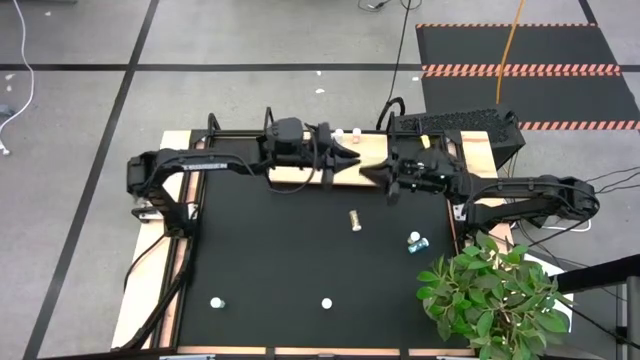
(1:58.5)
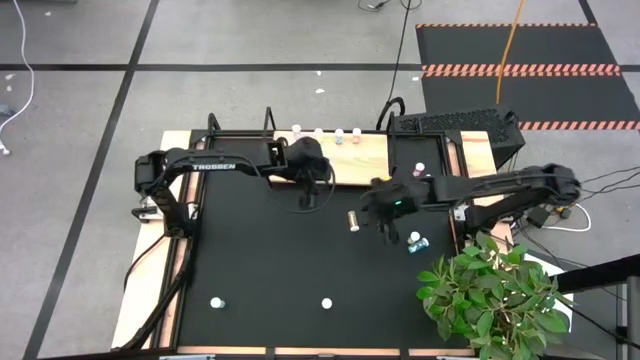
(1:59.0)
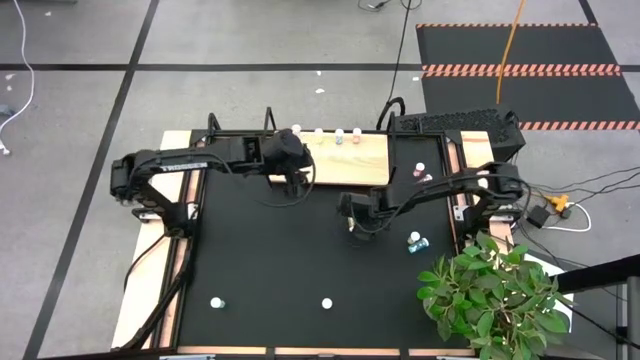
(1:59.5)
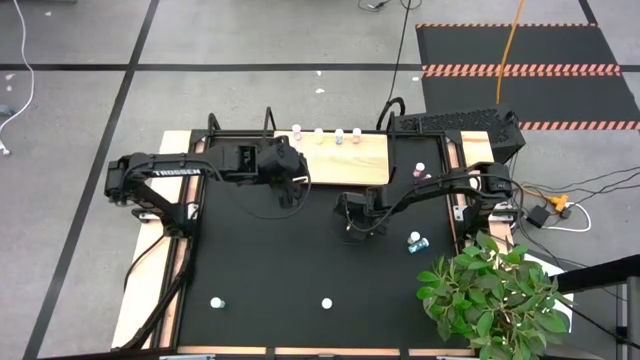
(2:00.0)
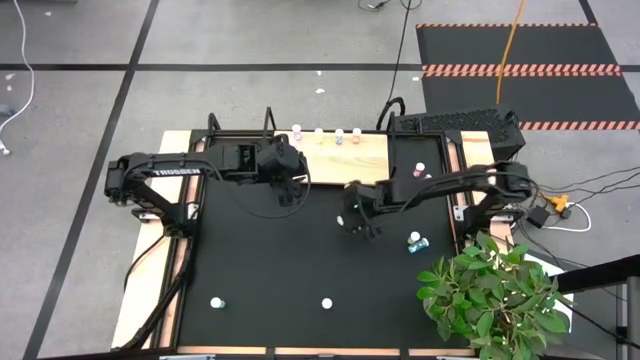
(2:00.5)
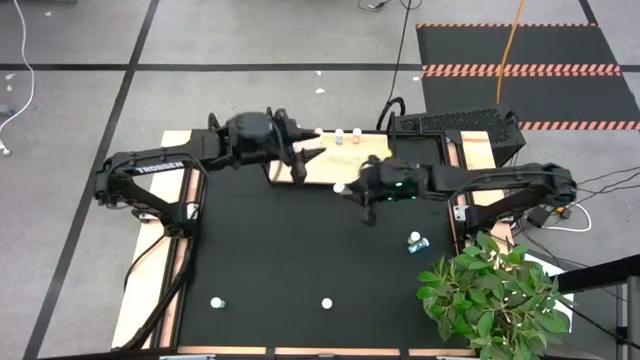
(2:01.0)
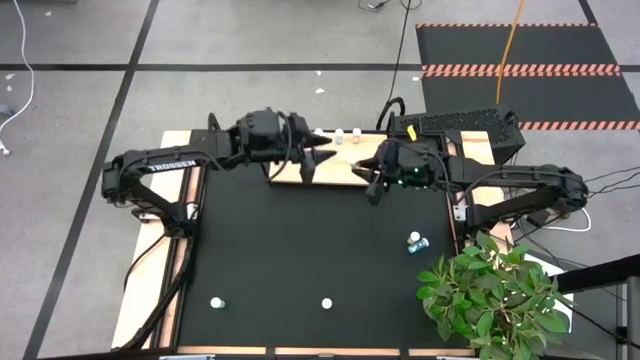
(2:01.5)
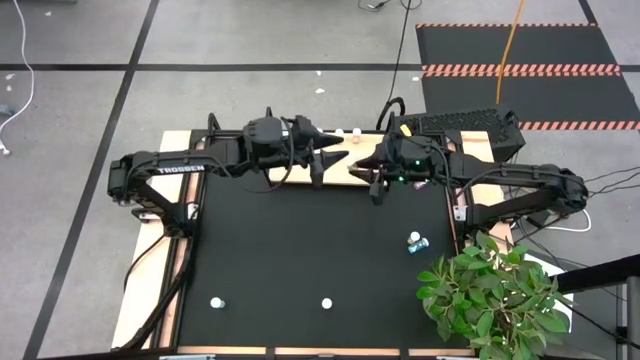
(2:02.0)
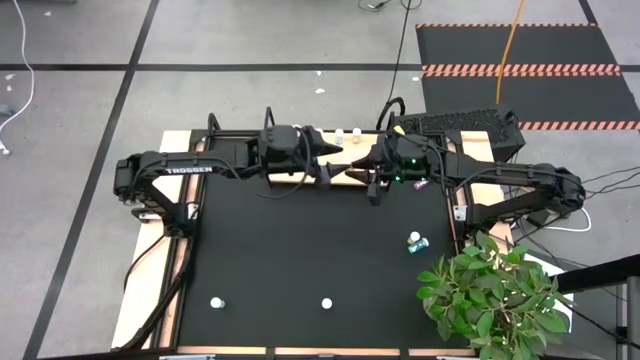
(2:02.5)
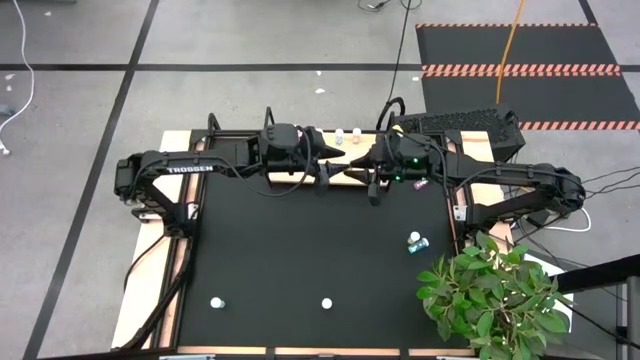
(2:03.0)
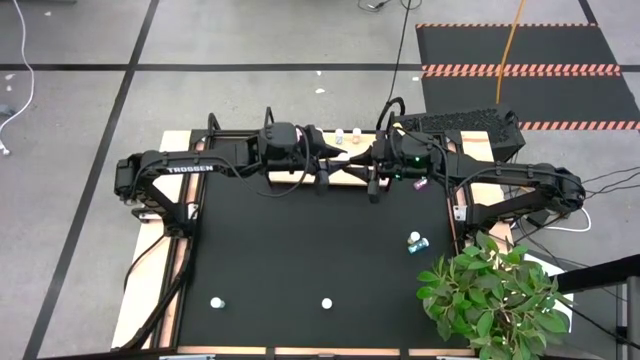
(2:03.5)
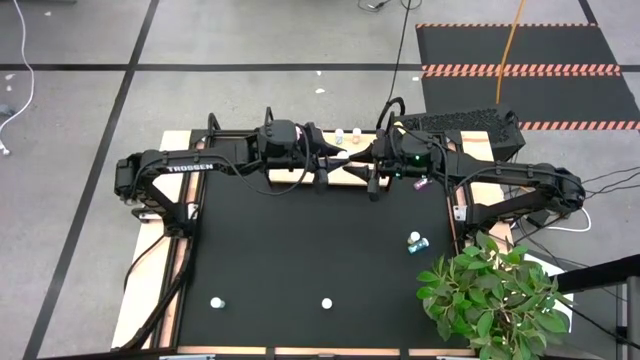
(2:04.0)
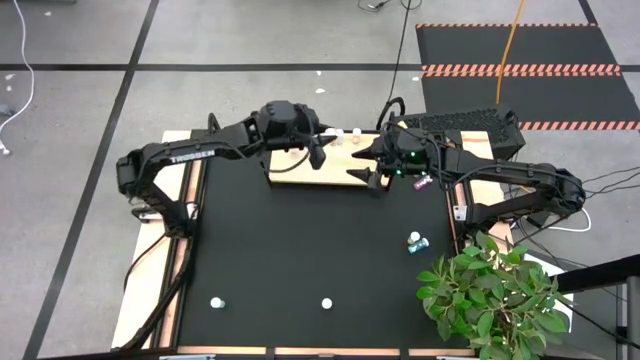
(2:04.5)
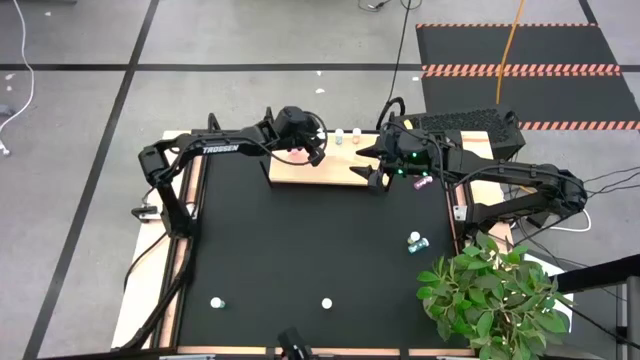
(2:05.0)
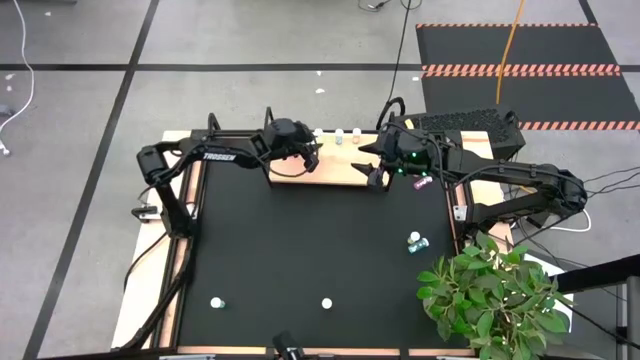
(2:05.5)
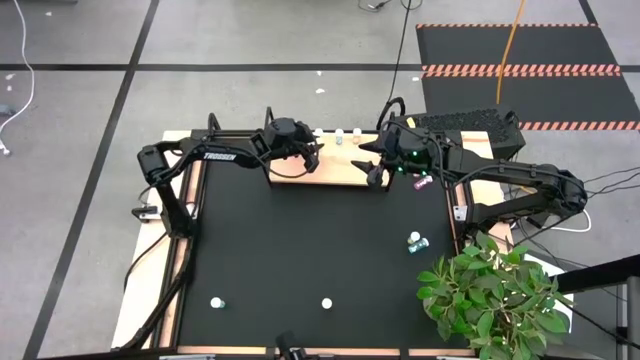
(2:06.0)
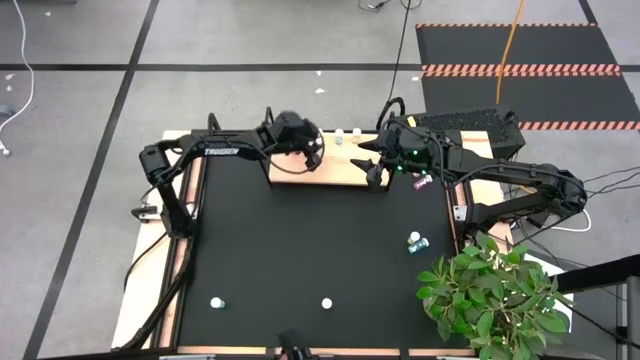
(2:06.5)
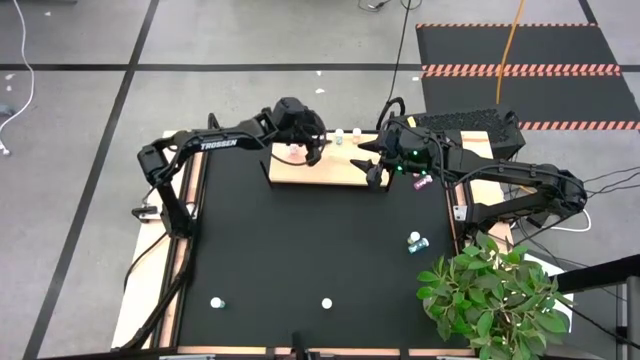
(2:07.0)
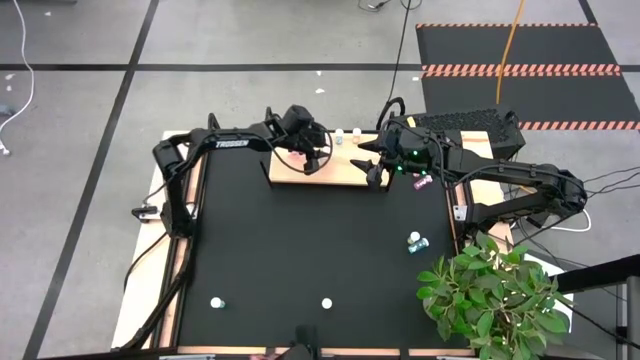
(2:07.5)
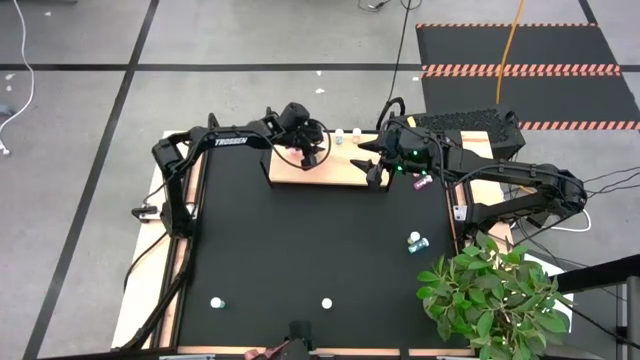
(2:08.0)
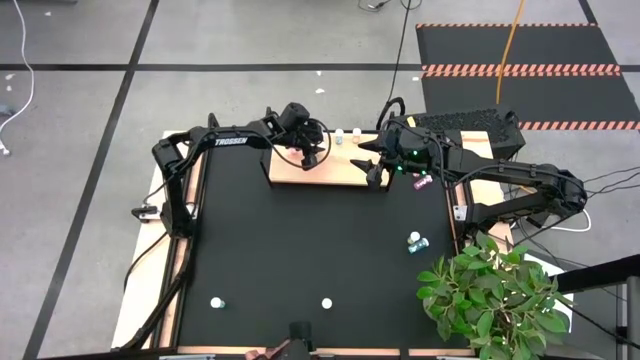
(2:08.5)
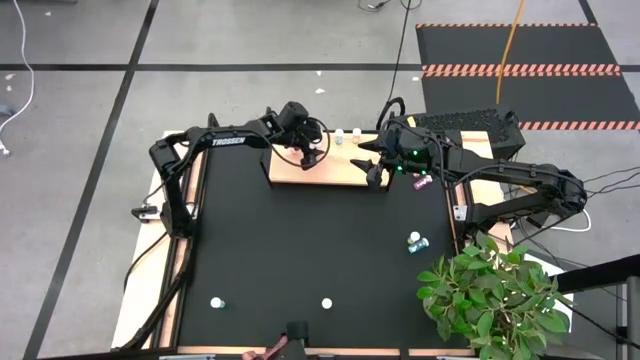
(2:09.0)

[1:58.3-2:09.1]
Task: Pick and place medicine bottles onto shelf by color
Put the bottom yellow pill bottle on the shelf aligned with the other yellow pill bottle

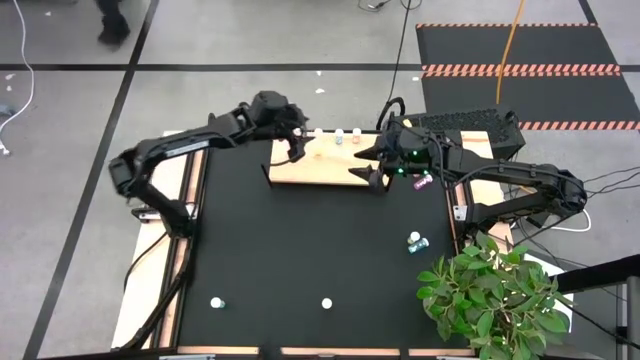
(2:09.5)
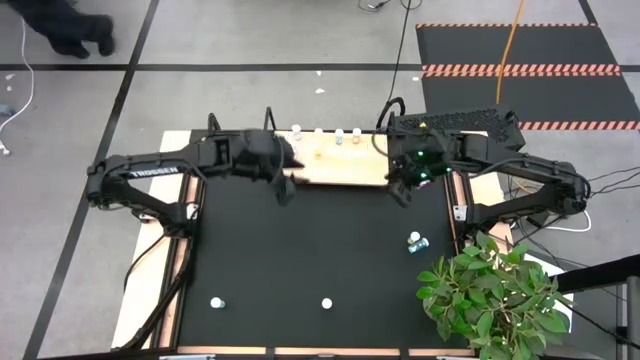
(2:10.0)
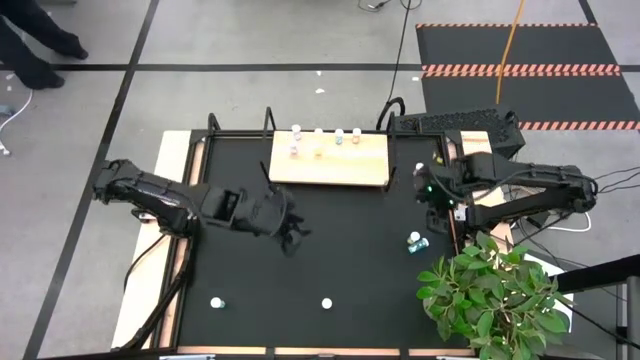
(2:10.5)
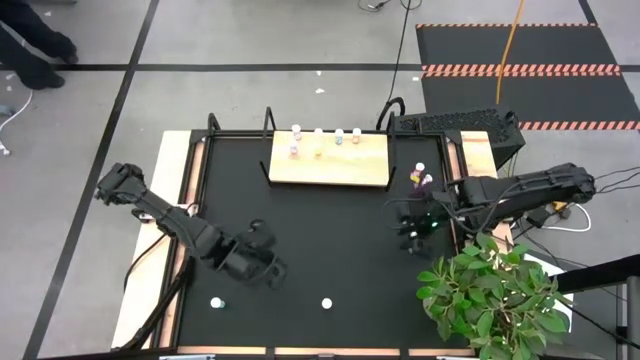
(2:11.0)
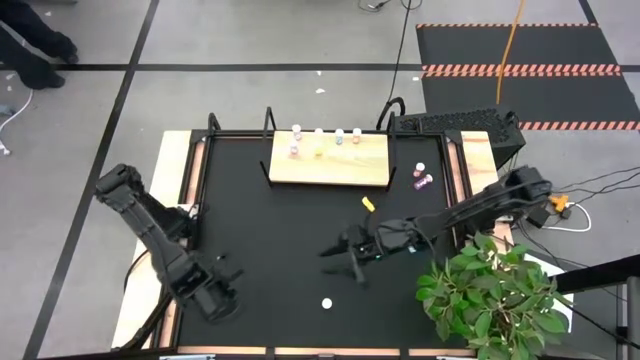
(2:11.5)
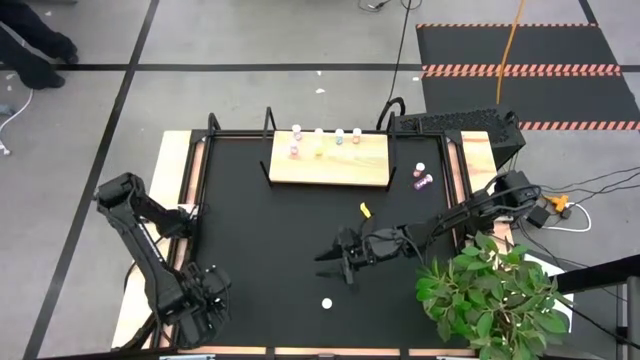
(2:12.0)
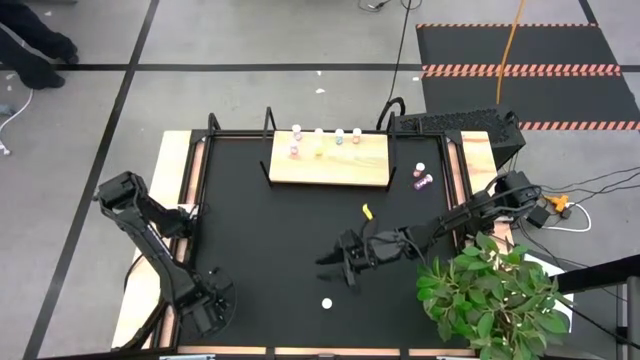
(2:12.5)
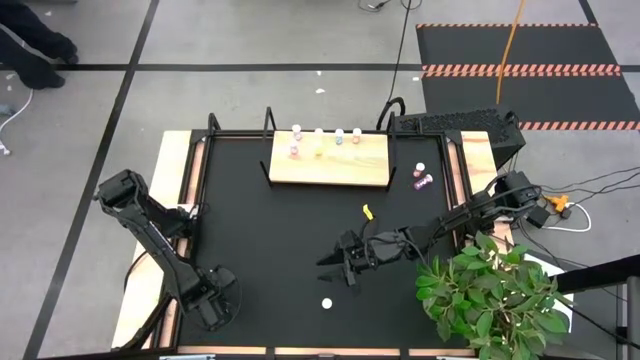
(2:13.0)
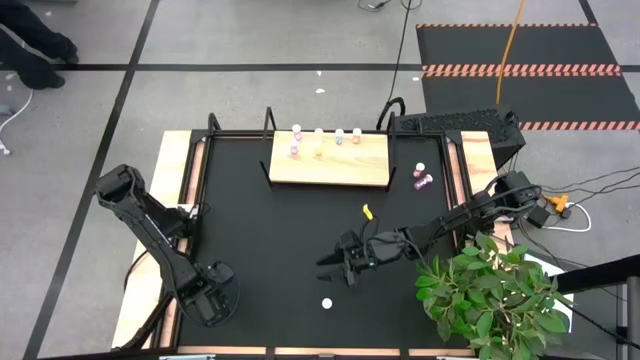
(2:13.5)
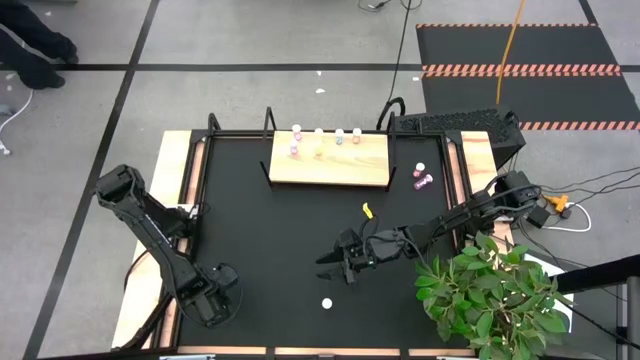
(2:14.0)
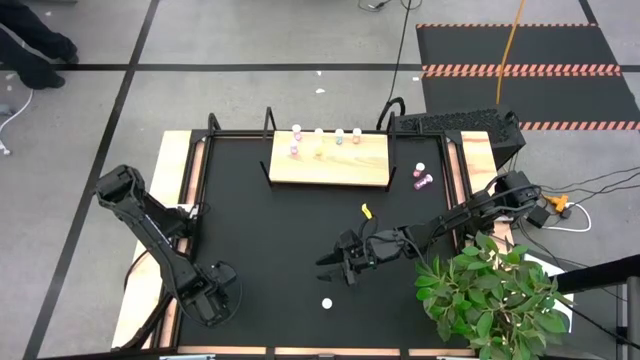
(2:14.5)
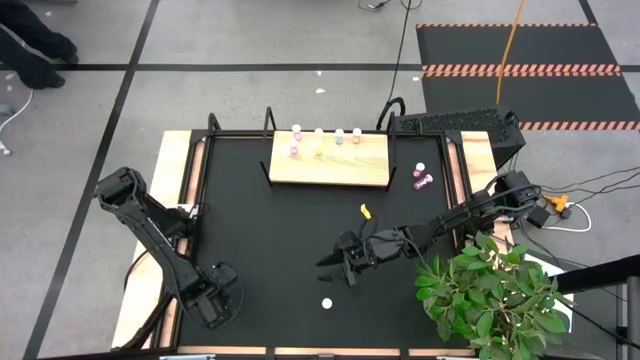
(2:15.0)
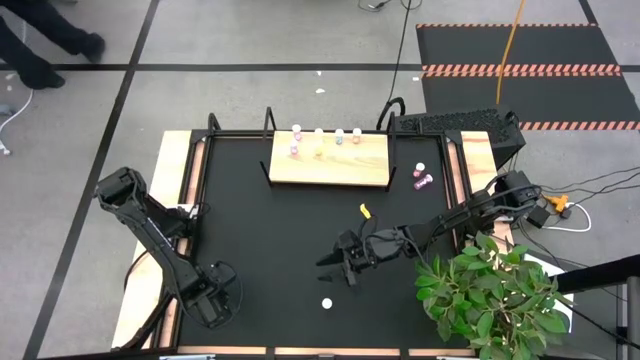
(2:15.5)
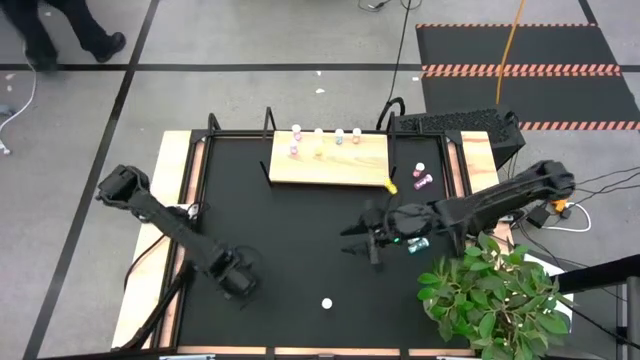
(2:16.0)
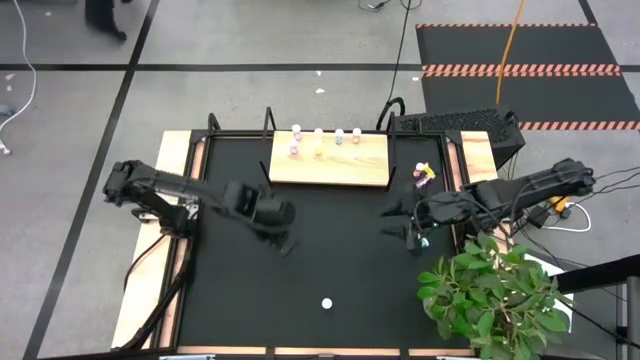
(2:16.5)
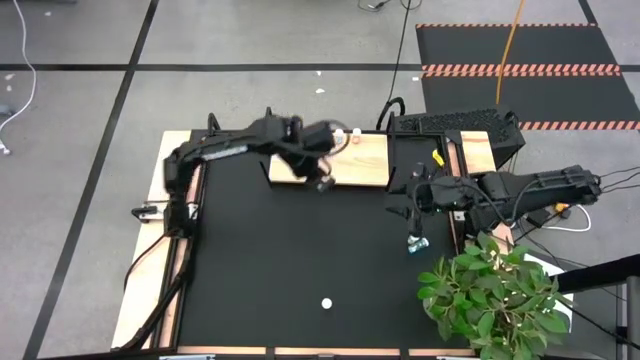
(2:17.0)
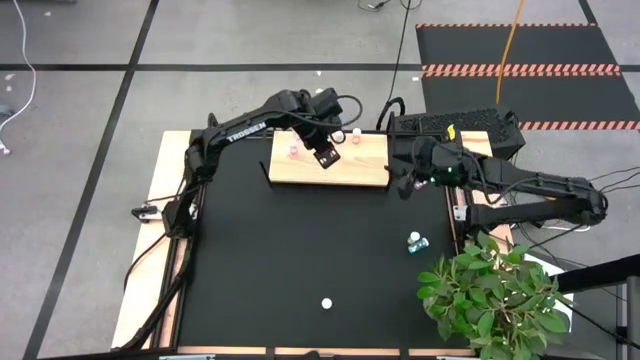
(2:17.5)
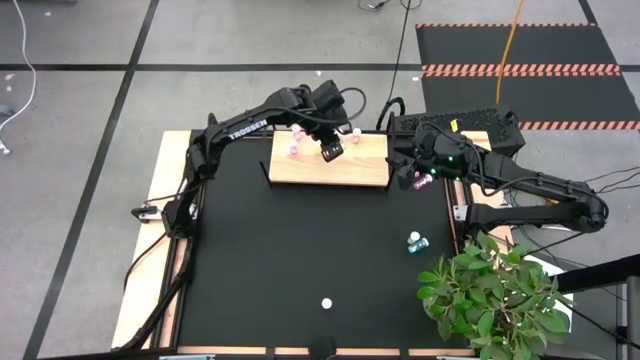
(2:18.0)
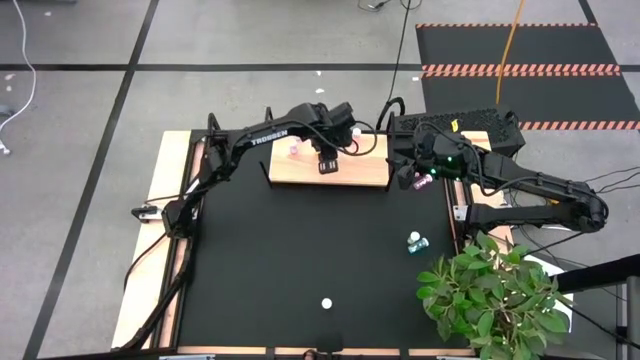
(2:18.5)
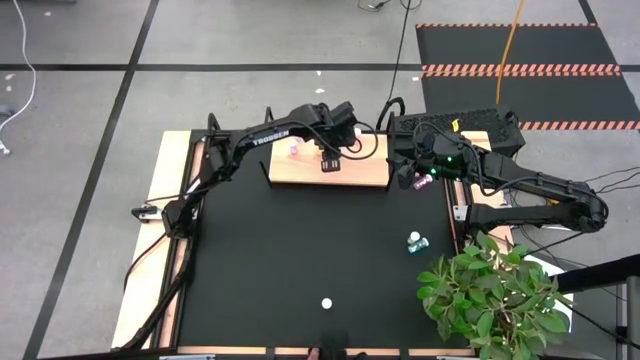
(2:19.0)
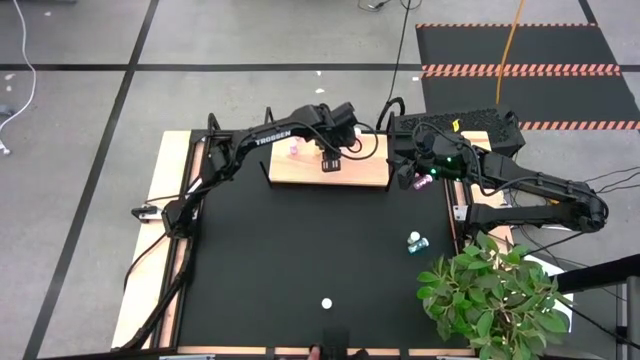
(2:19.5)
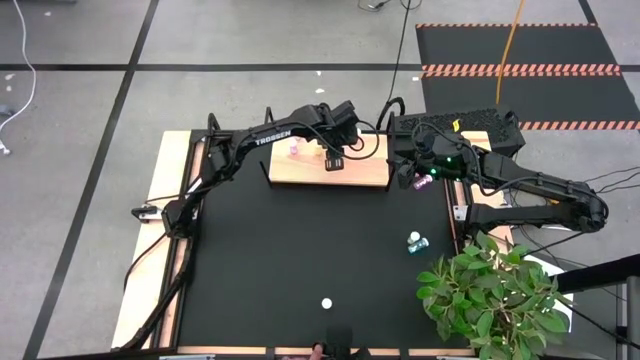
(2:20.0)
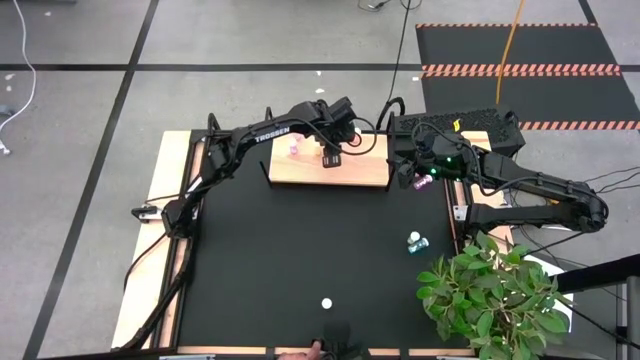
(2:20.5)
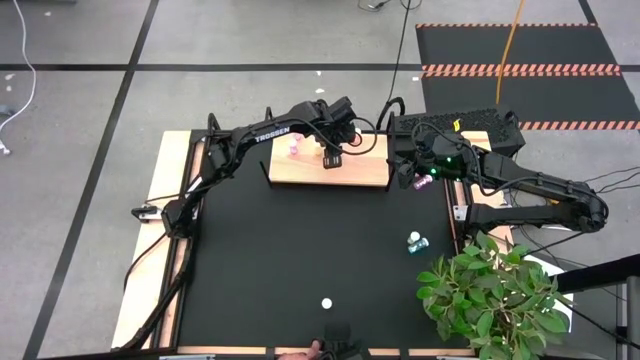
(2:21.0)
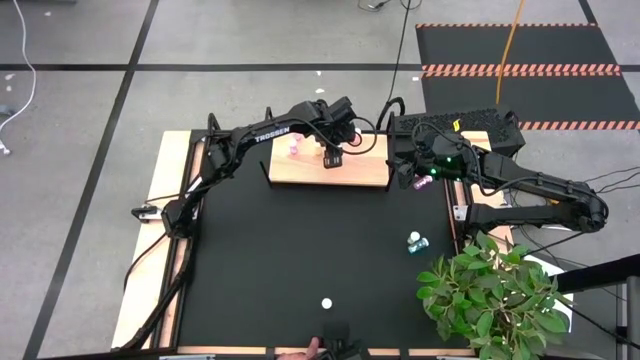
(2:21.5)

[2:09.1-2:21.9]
Put the bottom blue pill bottle on the shelf aligned with the other blue pill bottle
